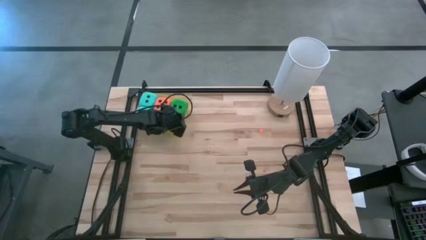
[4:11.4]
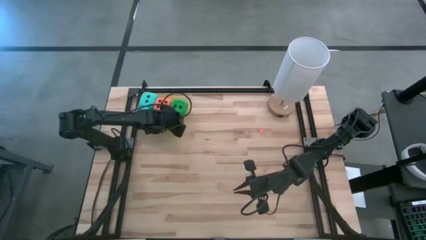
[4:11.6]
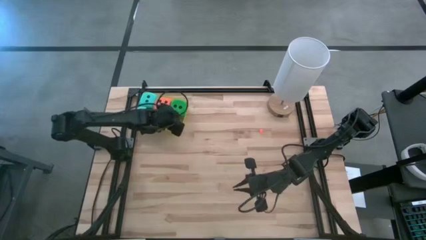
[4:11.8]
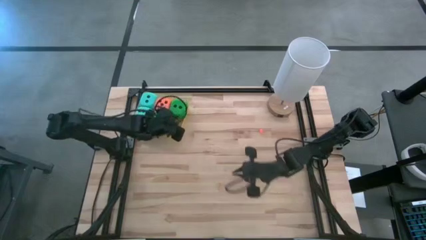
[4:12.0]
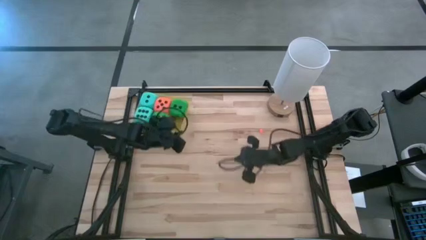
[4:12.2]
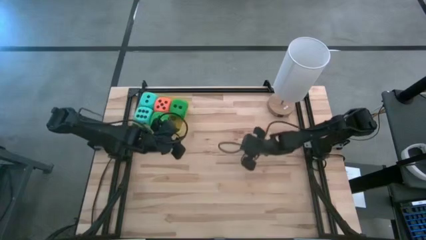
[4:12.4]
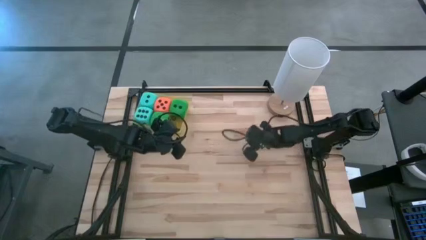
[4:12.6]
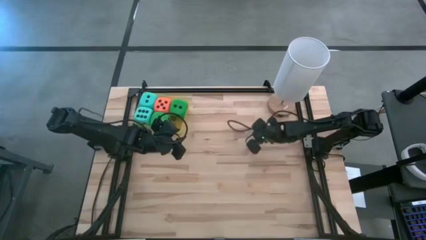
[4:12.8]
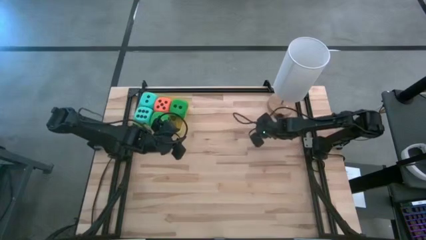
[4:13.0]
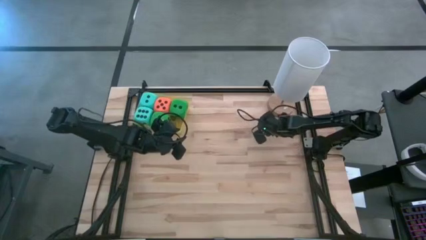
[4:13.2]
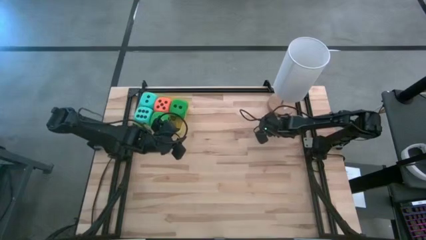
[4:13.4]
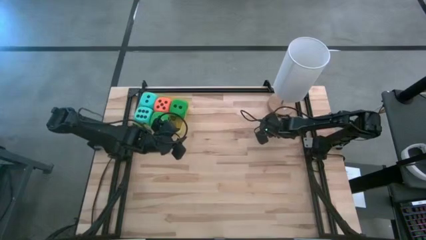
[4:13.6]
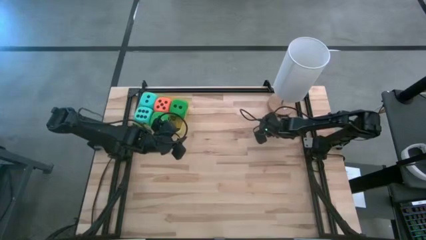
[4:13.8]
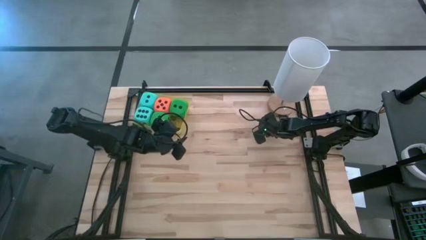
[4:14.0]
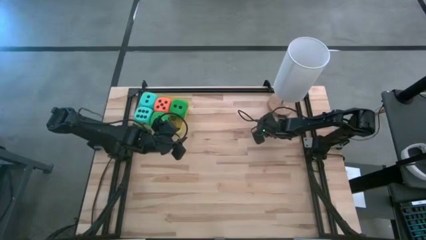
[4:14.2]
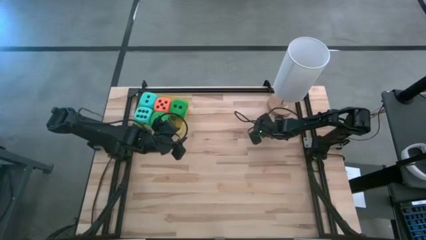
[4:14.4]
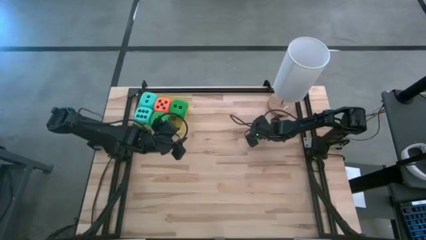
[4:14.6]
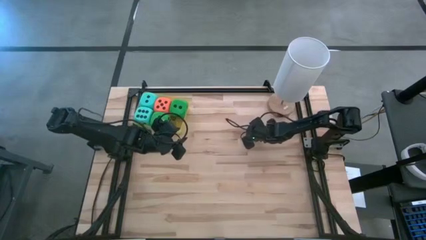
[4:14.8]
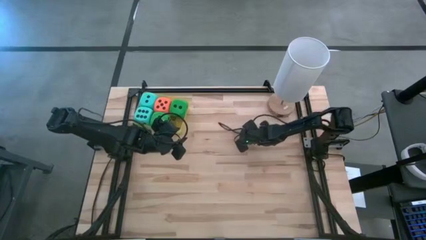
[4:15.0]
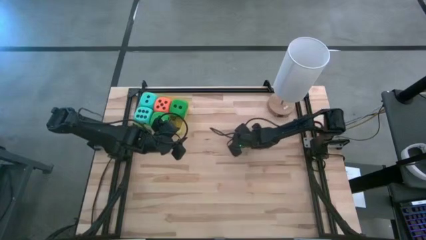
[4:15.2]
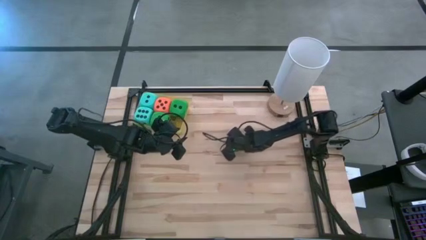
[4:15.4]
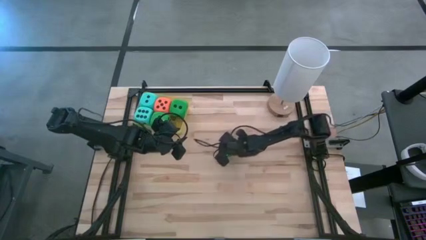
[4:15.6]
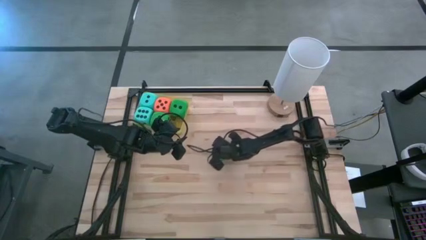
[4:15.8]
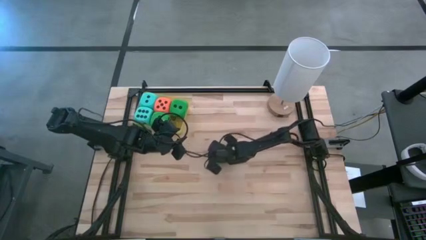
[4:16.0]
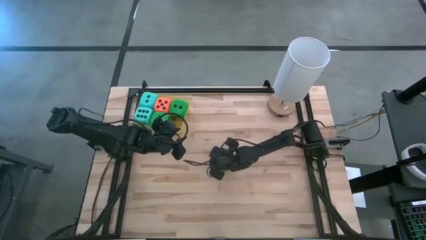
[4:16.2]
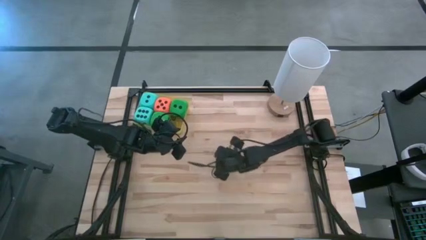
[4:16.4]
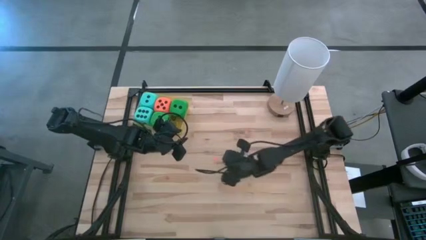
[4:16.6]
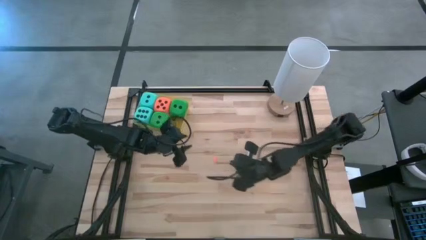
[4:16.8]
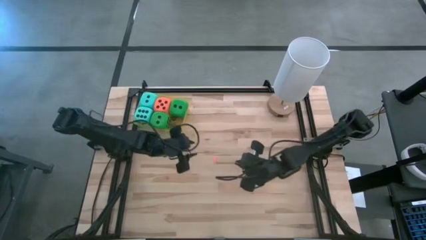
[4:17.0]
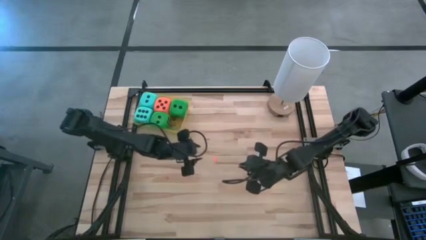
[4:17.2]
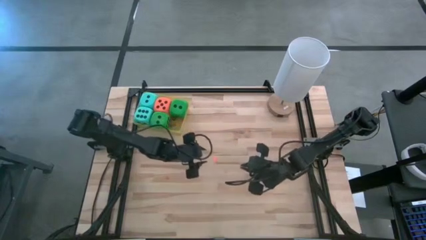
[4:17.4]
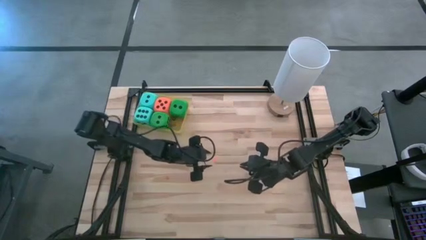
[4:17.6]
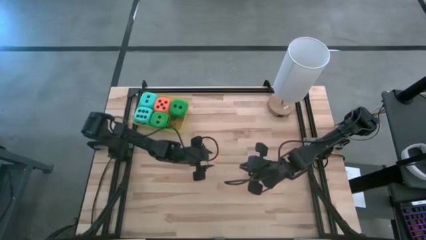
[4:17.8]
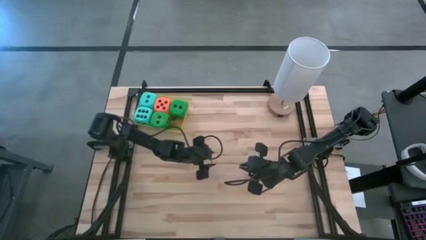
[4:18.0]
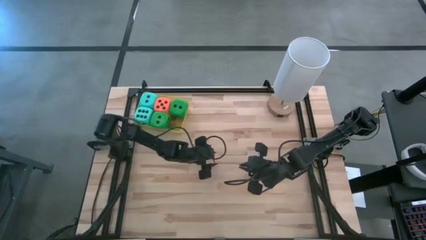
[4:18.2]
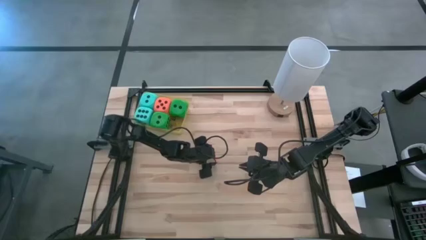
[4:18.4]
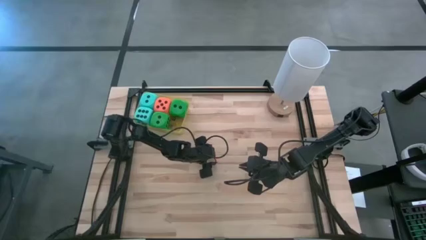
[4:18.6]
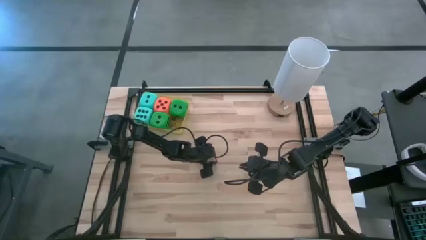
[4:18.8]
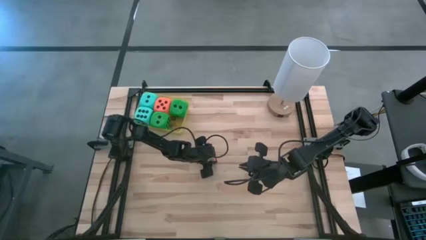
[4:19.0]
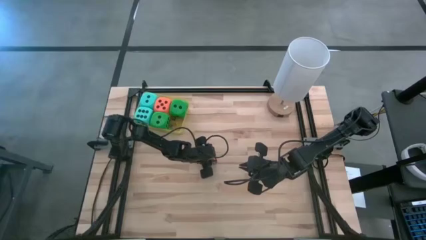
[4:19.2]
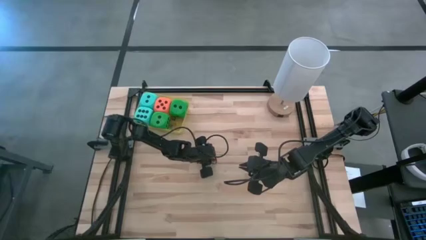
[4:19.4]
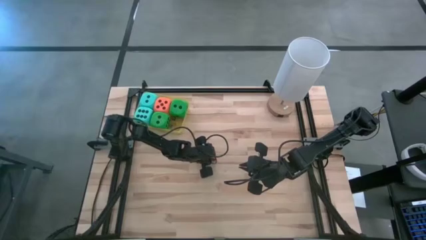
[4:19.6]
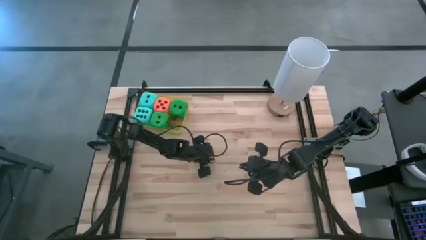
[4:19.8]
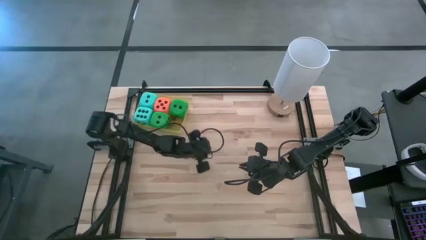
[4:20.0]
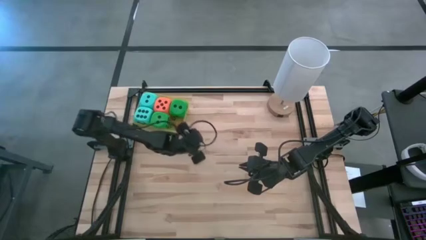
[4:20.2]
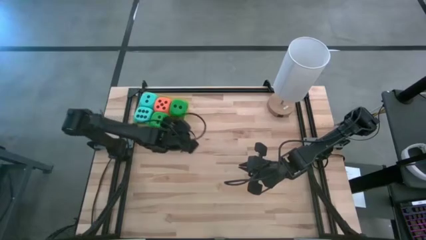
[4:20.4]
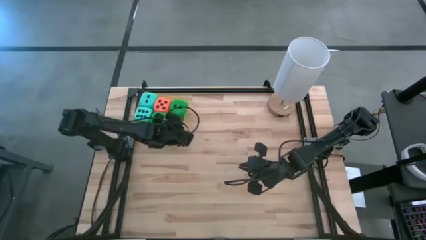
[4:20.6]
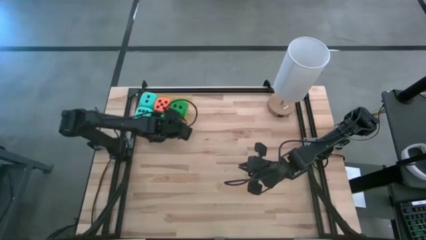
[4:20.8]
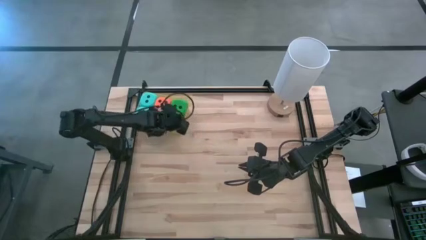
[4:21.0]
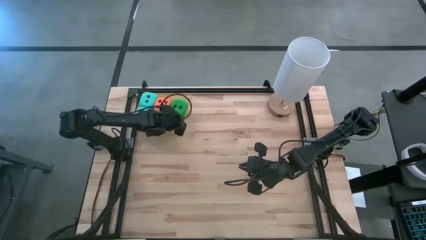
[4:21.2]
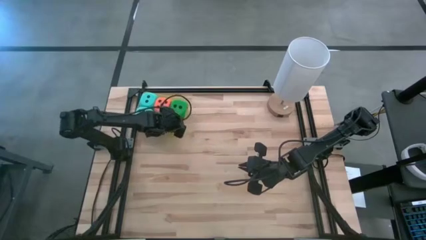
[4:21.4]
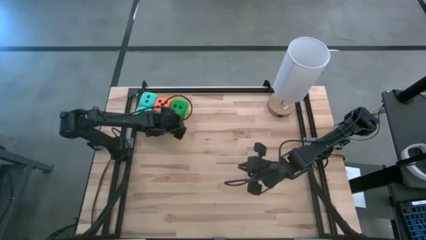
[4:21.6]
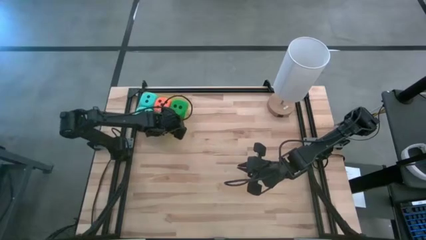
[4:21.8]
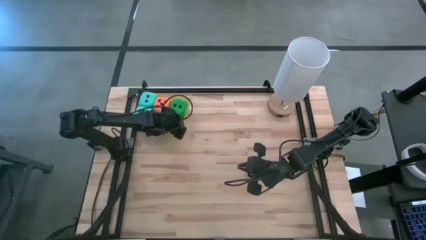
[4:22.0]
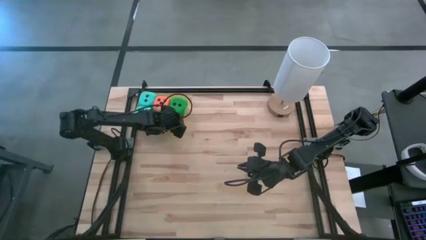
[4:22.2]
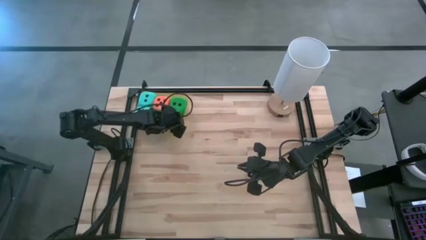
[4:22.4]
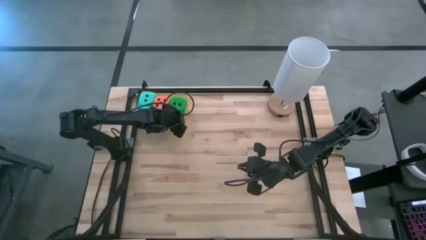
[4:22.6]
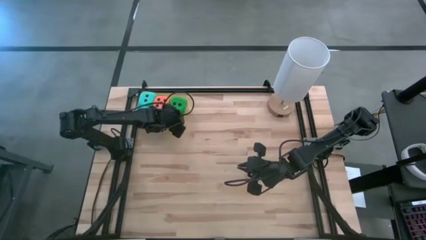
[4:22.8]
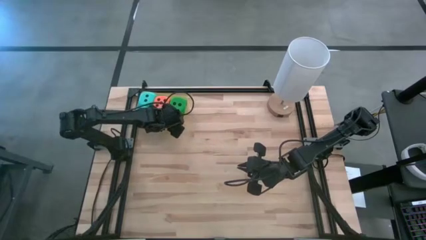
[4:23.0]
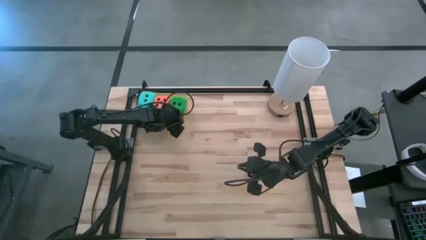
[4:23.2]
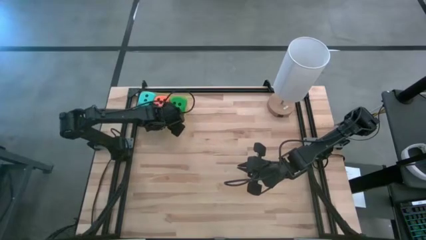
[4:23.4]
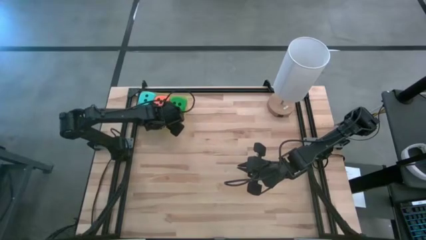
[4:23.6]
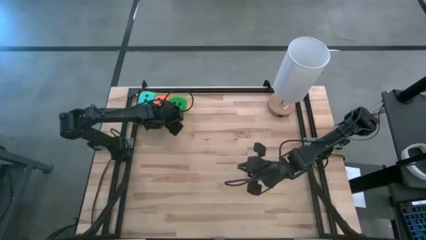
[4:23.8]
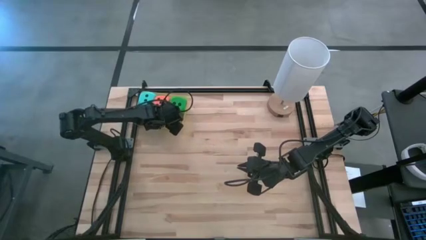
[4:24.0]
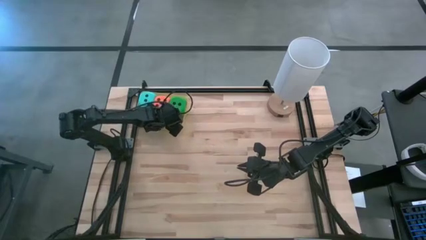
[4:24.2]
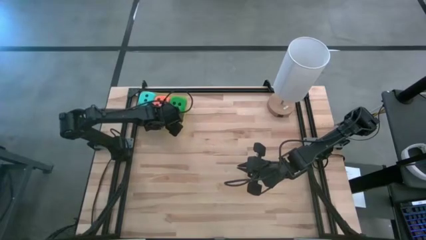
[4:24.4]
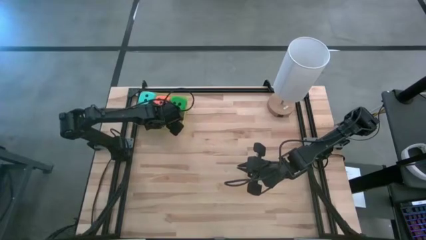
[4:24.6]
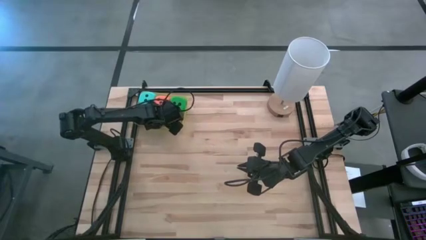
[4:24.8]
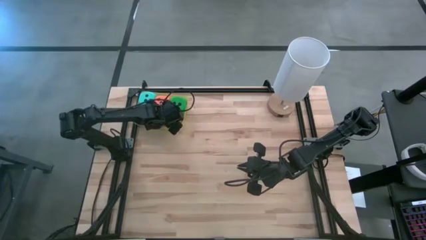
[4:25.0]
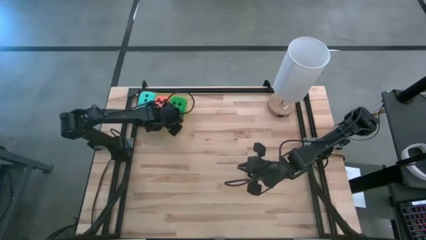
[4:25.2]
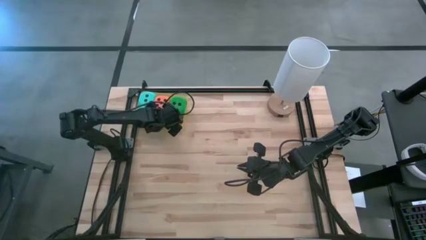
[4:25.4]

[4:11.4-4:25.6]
Task: Pick & Place Dice
Put the orange small die into the yellow container
